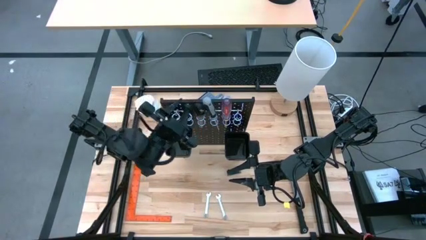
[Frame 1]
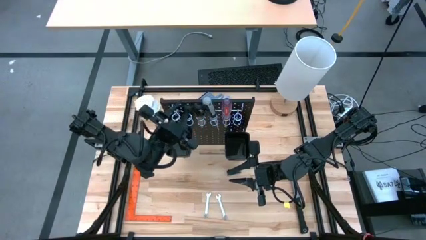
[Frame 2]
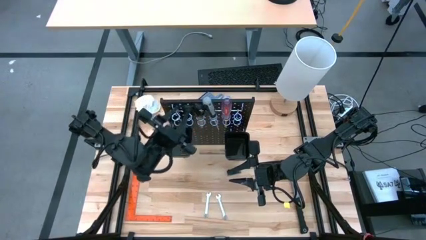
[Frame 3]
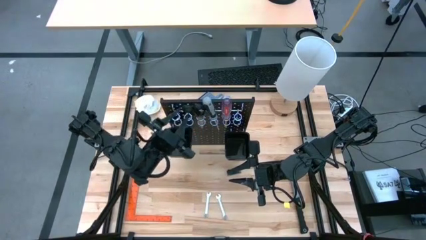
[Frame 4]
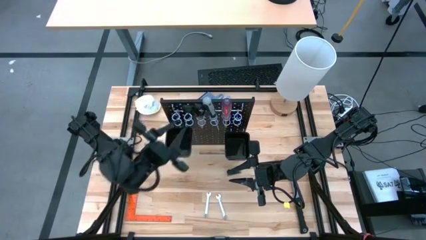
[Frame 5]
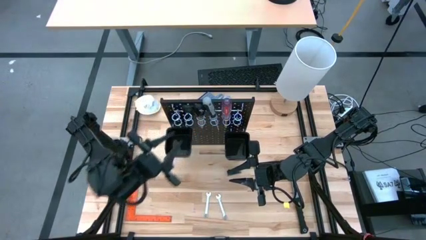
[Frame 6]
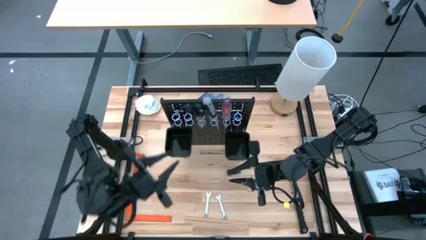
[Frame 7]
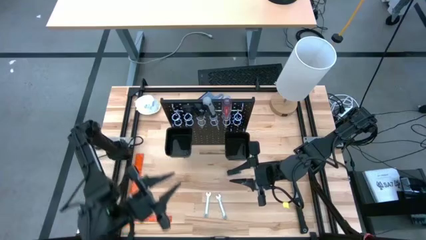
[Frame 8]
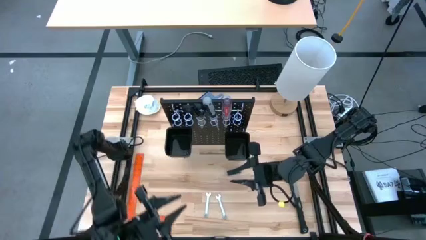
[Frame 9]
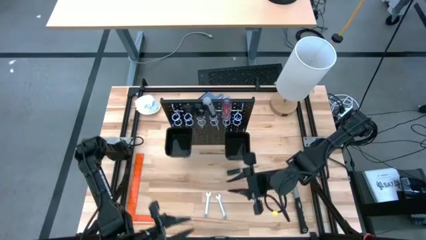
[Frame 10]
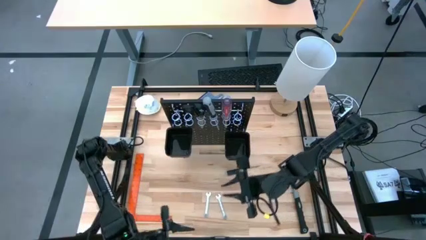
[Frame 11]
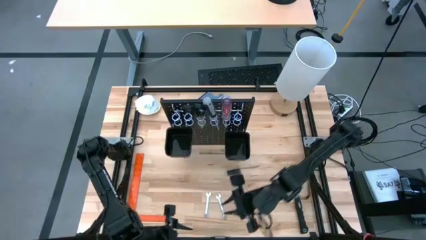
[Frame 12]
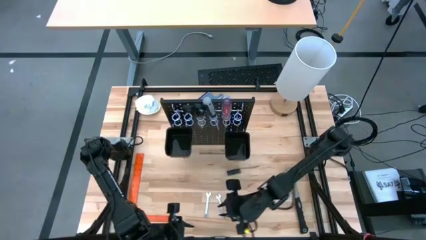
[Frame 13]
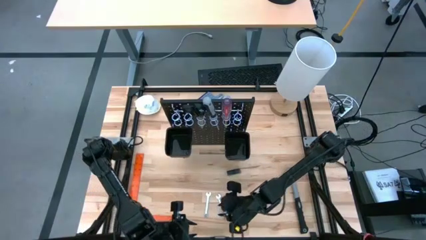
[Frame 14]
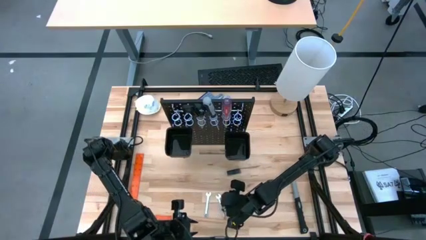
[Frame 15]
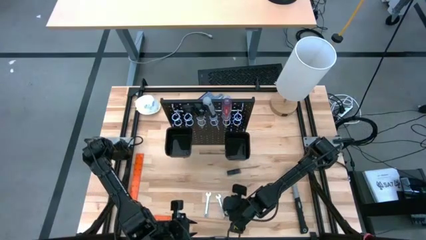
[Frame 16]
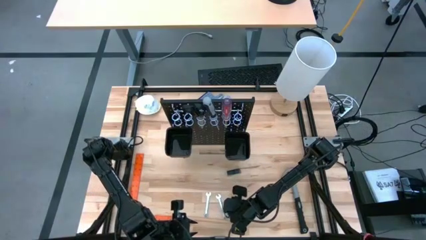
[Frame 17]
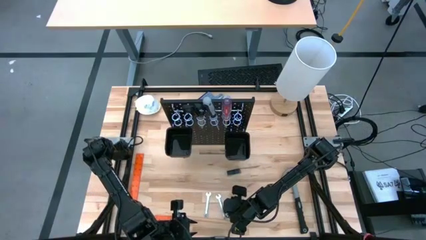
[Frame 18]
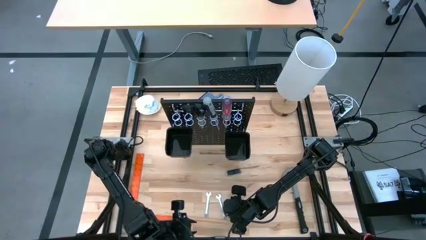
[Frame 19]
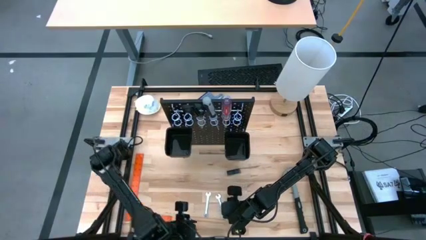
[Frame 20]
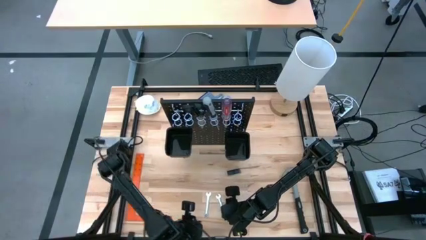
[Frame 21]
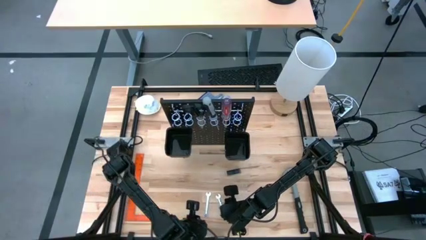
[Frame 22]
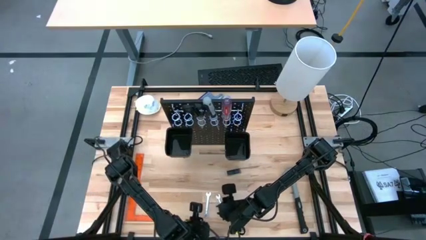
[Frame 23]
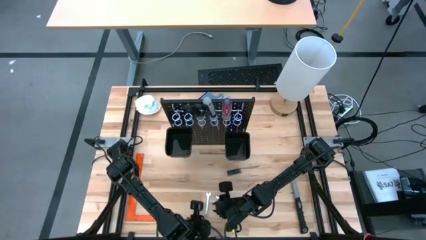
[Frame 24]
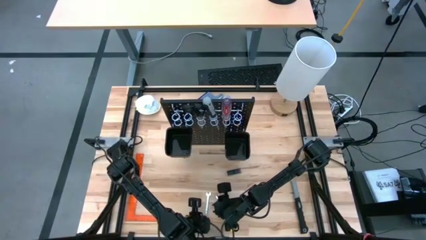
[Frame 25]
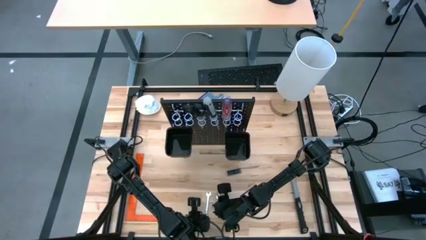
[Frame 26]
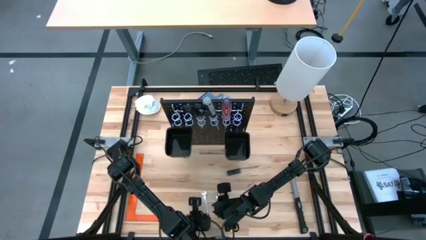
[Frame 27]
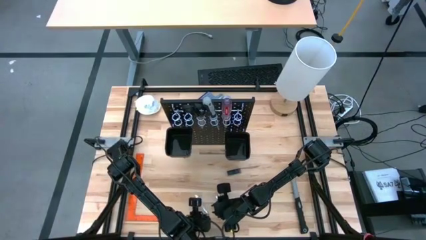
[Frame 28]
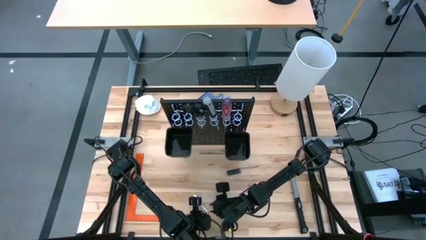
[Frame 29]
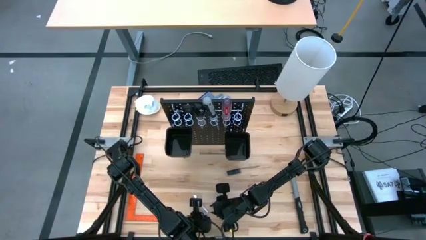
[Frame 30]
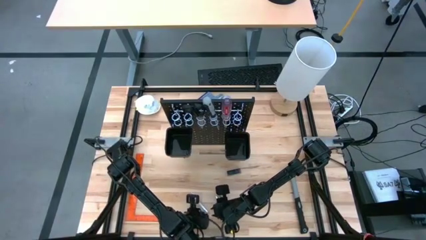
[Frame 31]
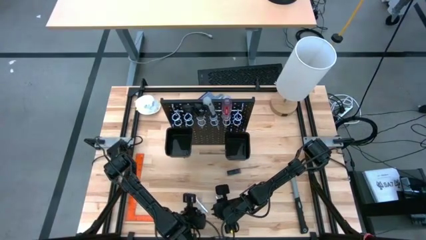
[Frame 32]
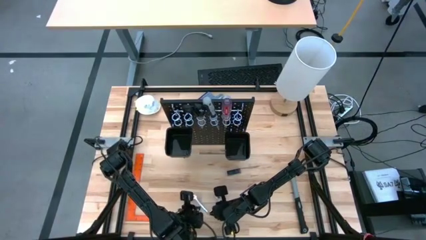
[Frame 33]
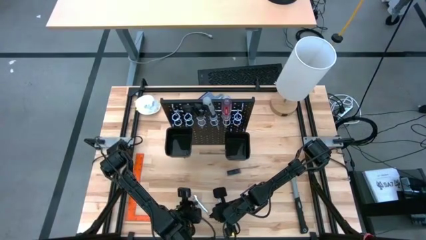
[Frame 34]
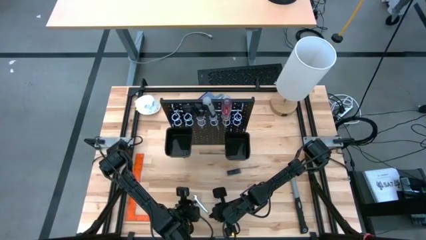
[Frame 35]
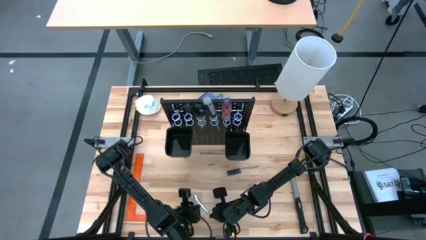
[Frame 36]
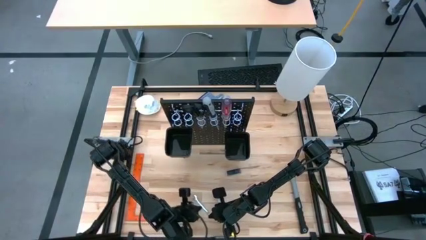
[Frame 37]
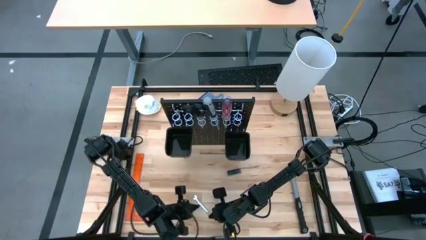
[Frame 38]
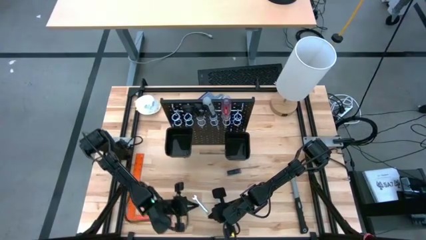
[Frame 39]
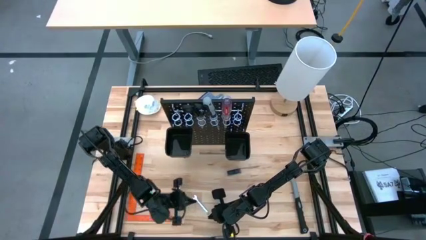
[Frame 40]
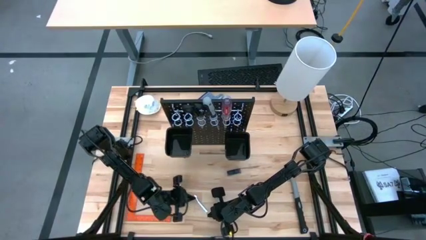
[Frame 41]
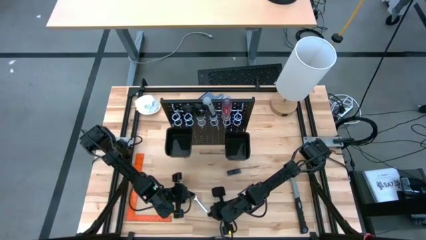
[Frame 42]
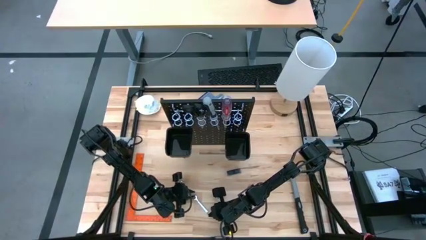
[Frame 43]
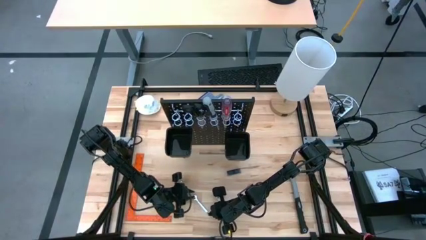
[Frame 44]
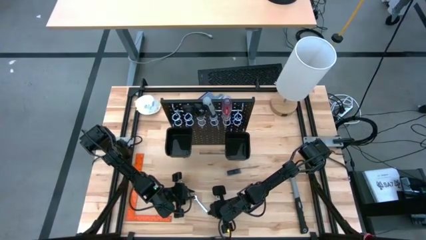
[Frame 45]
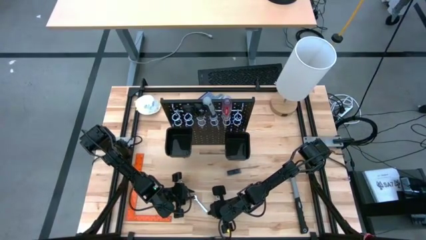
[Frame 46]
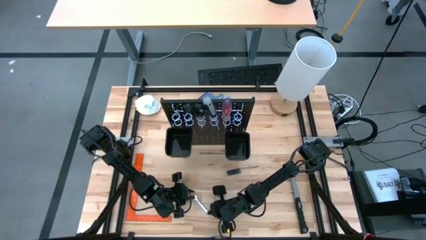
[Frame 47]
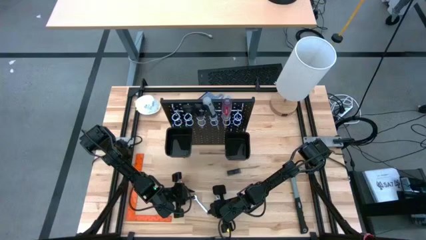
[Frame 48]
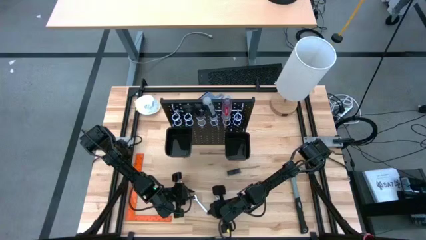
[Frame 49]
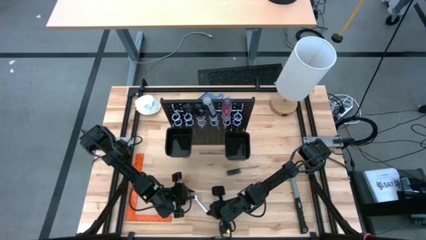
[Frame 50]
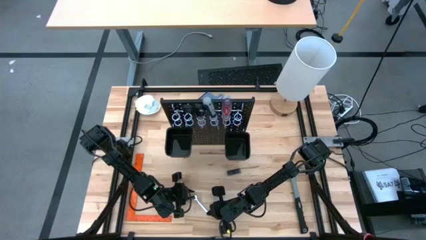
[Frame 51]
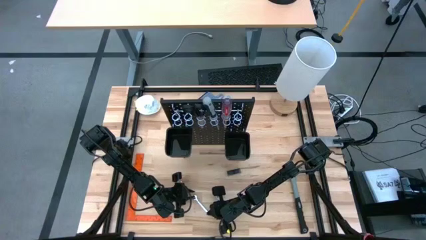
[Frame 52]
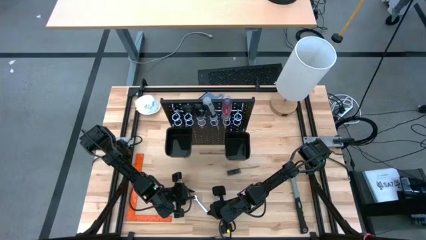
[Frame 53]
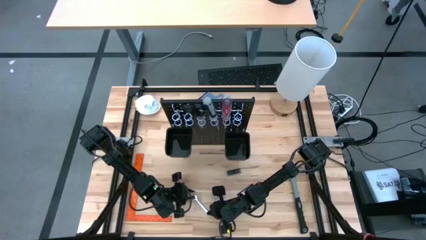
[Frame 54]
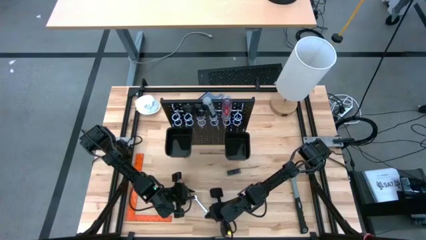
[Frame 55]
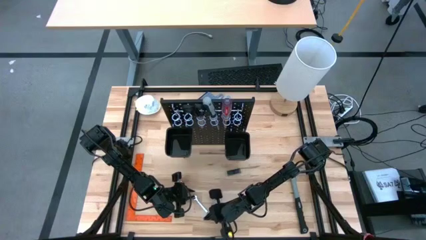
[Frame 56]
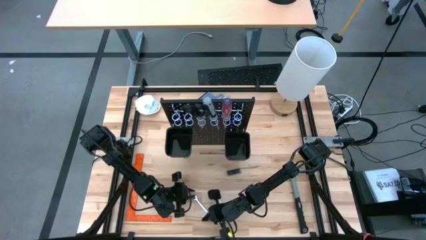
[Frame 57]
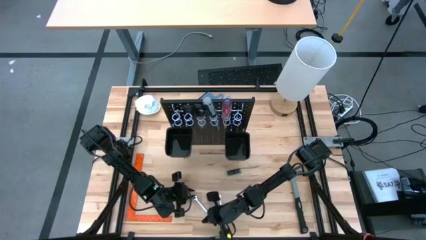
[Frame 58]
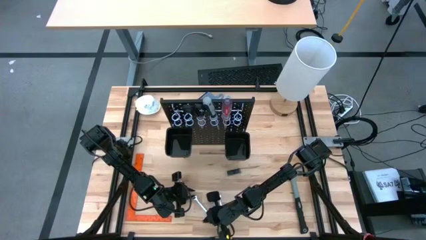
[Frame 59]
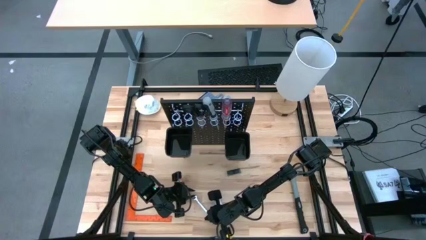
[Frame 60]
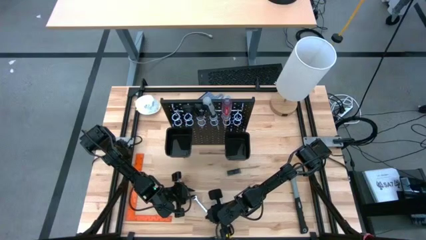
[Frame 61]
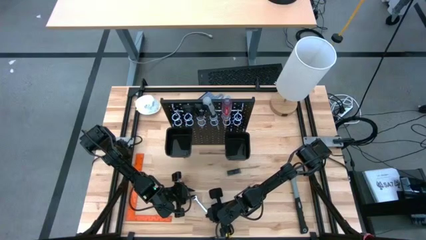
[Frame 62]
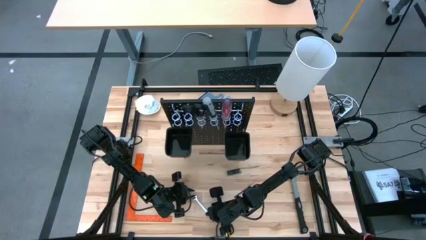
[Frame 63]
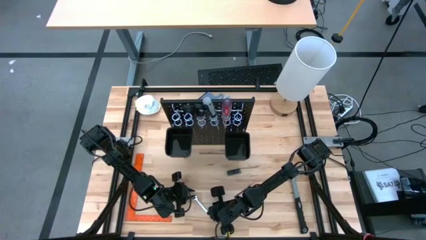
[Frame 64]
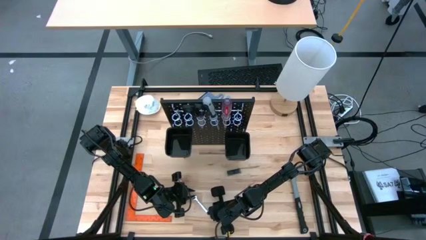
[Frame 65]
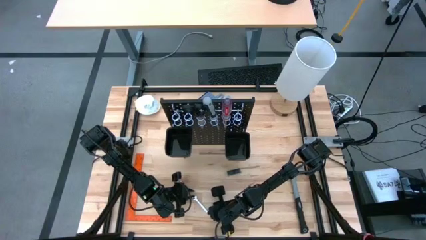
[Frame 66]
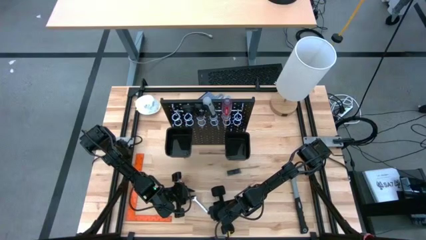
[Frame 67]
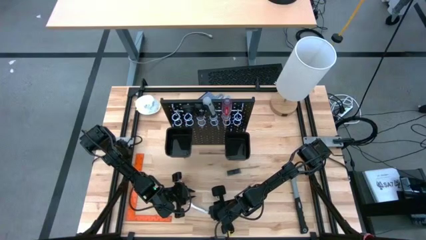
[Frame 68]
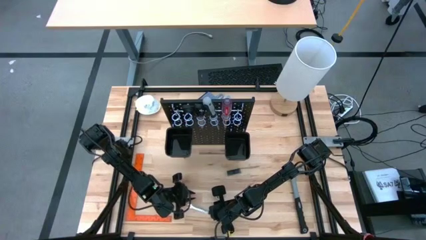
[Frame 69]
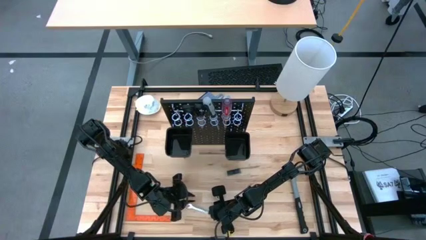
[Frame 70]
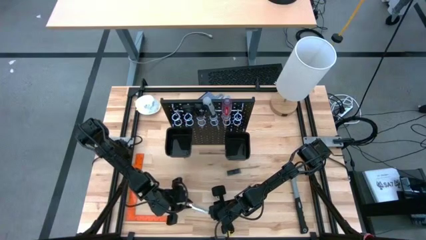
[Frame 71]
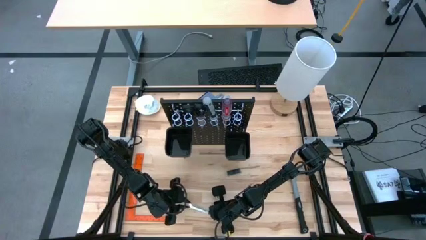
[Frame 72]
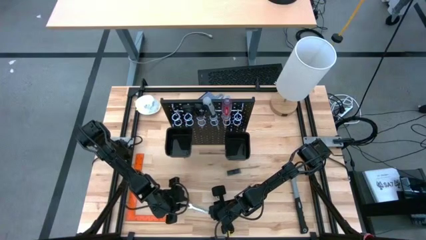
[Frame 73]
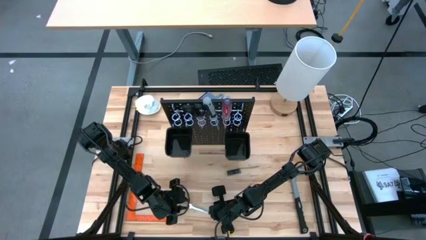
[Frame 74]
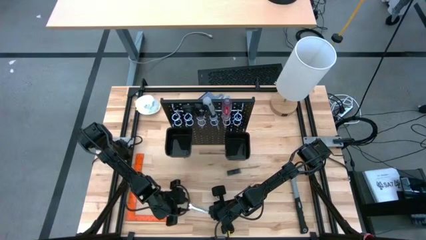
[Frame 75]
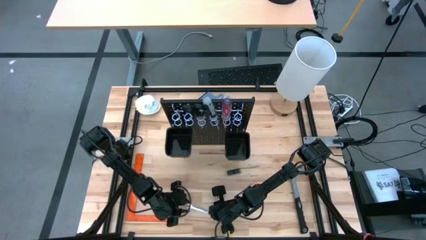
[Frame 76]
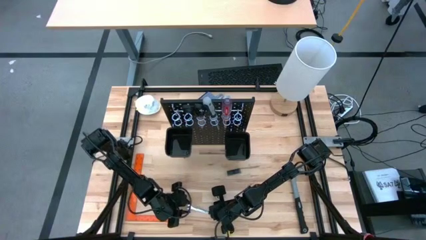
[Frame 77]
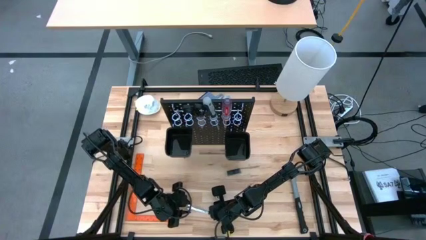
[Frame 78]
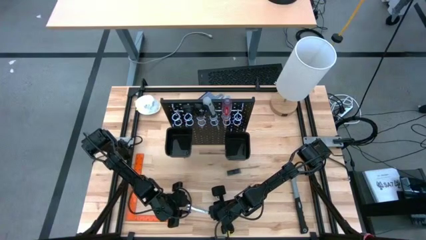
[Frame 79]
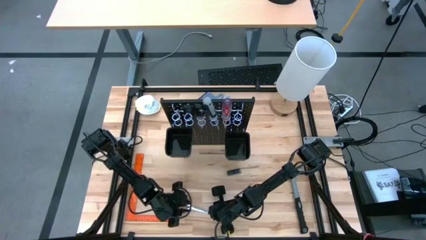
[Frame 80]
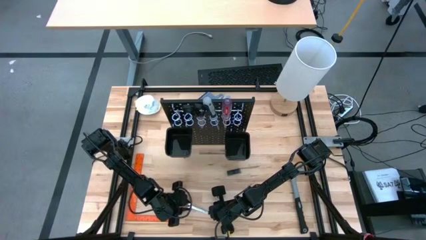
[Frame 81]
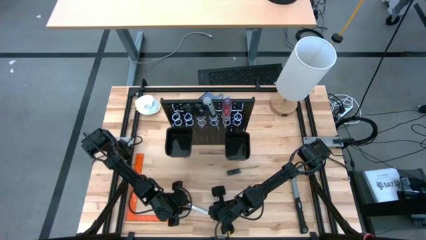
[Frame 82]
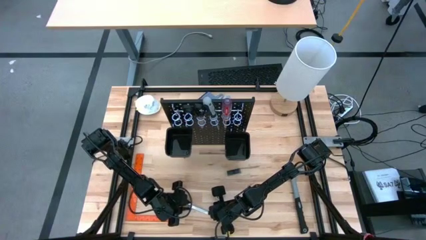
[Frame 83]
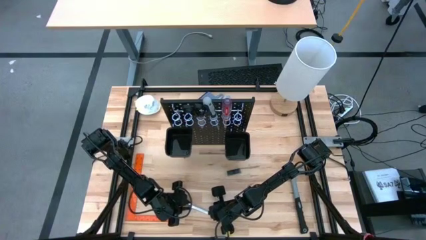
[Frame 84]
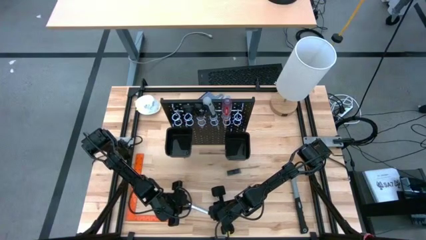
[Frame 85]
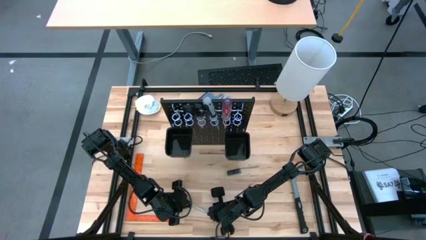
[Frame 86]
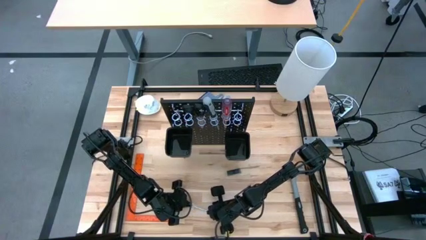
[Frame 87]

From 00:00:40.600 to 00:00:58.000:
Task: Hang tools onto peg board
Hang the silver wrench on the black peg board
